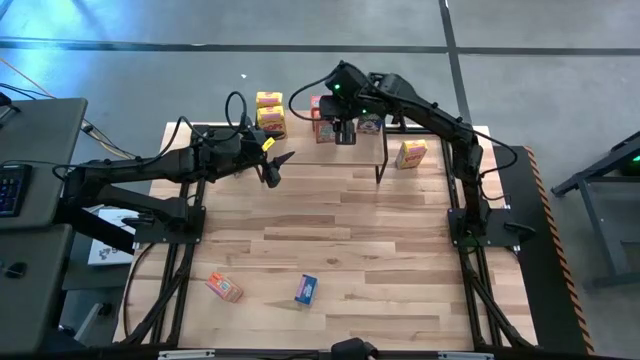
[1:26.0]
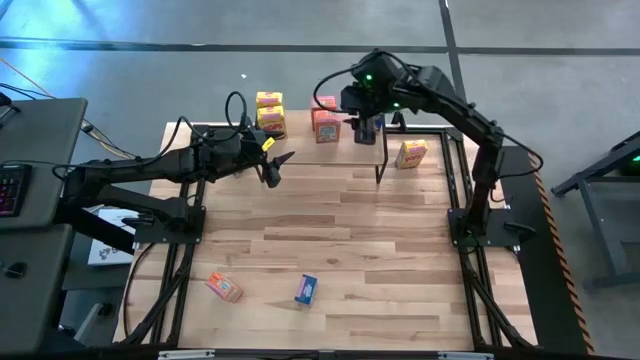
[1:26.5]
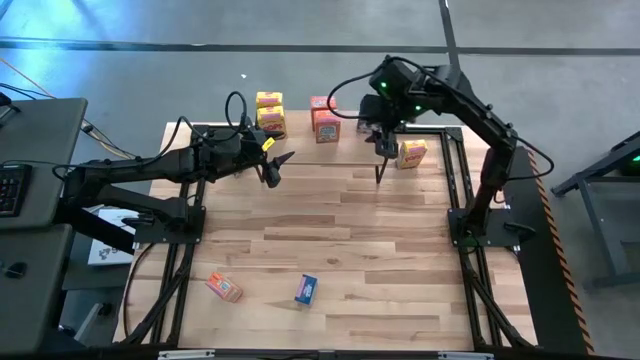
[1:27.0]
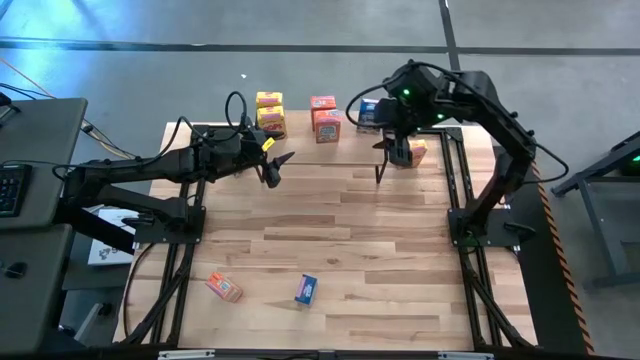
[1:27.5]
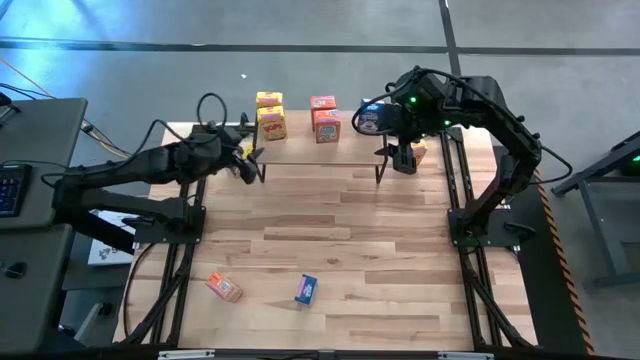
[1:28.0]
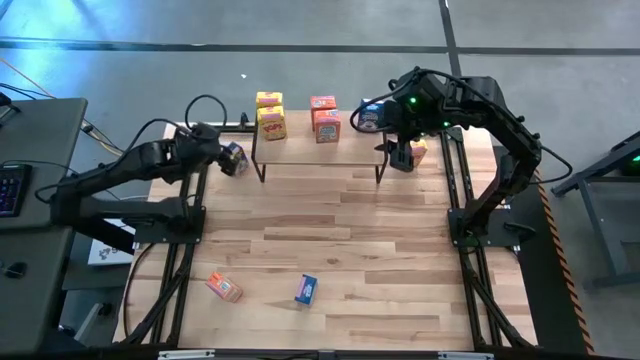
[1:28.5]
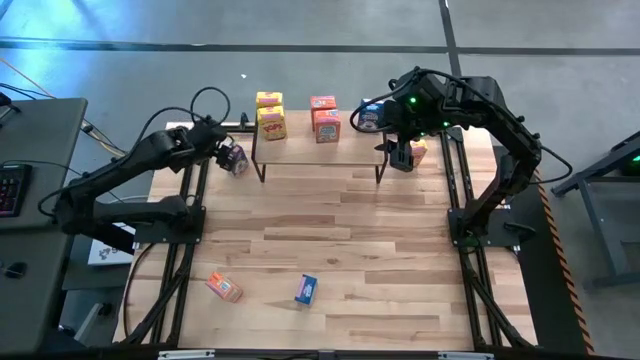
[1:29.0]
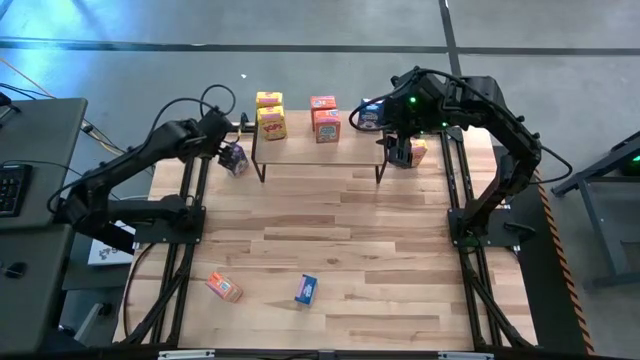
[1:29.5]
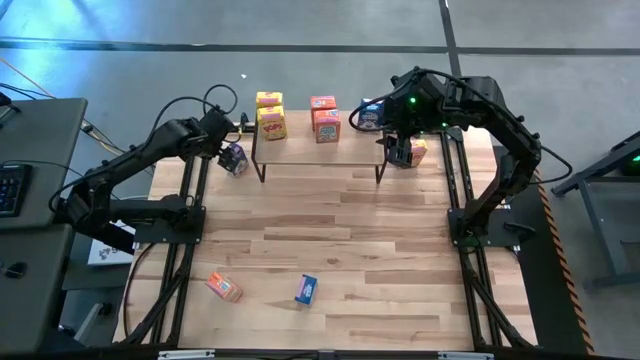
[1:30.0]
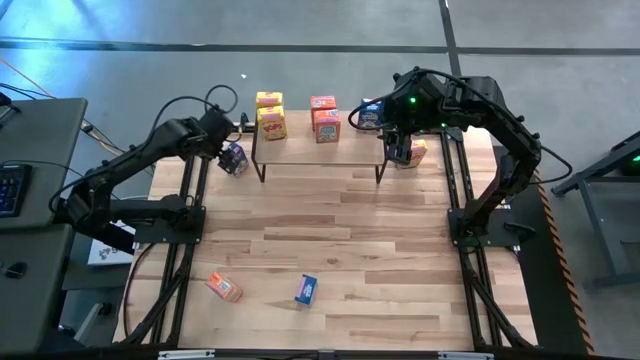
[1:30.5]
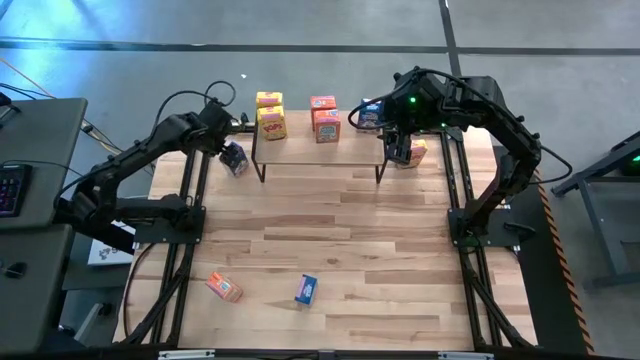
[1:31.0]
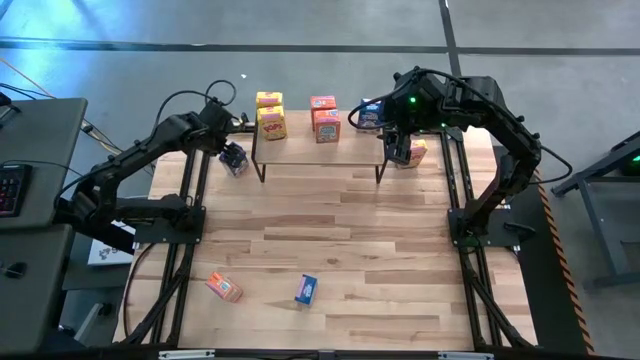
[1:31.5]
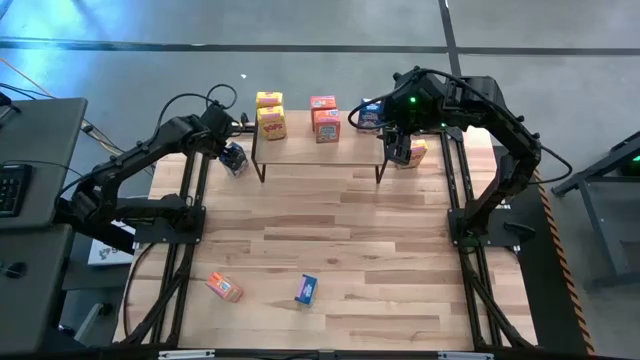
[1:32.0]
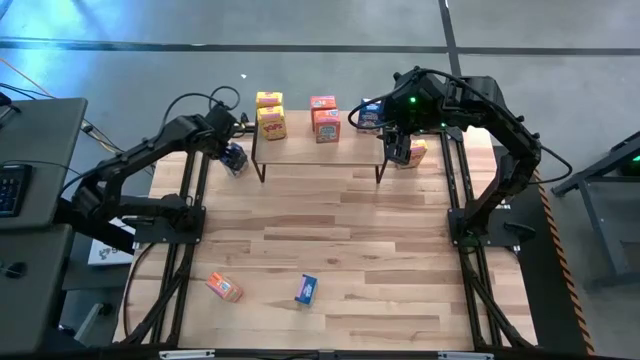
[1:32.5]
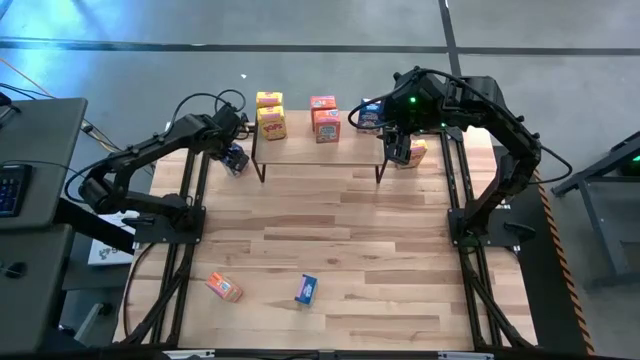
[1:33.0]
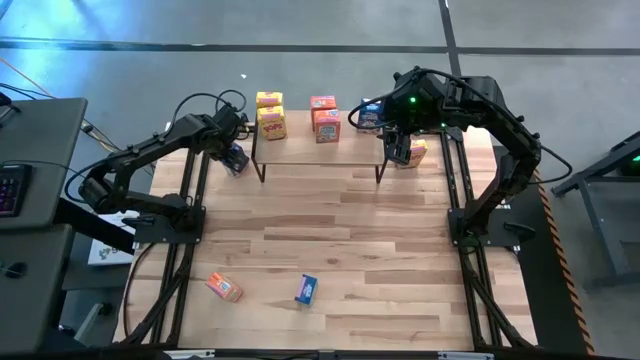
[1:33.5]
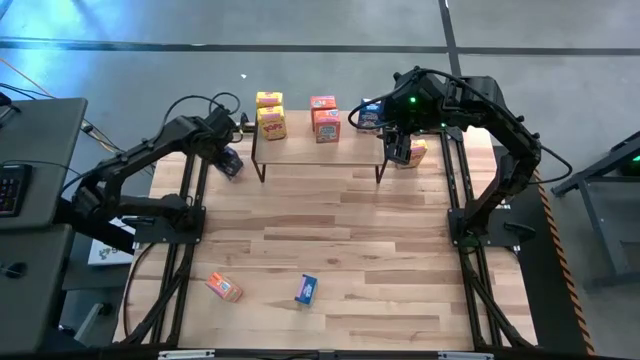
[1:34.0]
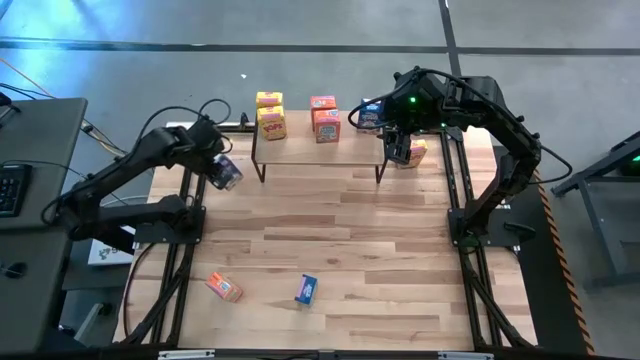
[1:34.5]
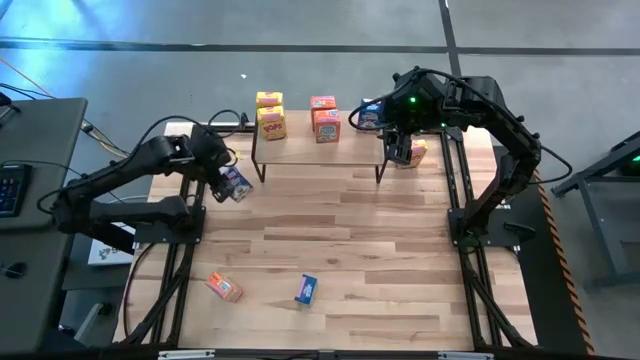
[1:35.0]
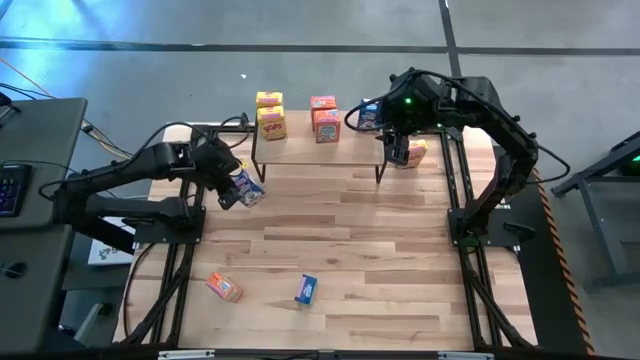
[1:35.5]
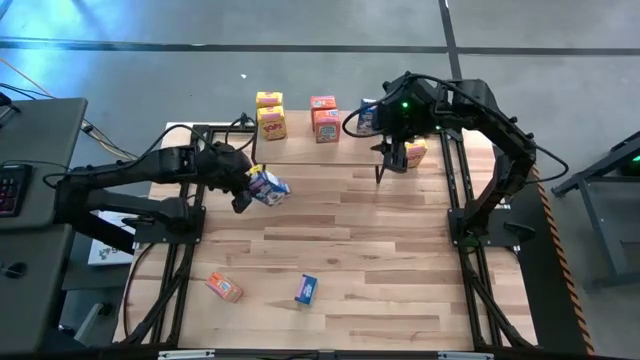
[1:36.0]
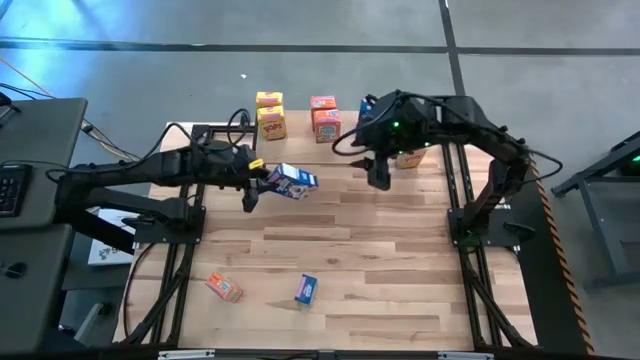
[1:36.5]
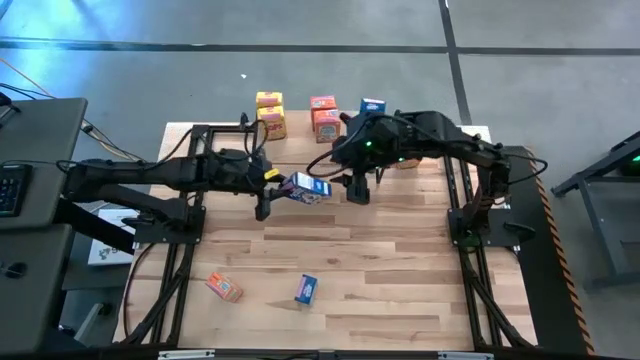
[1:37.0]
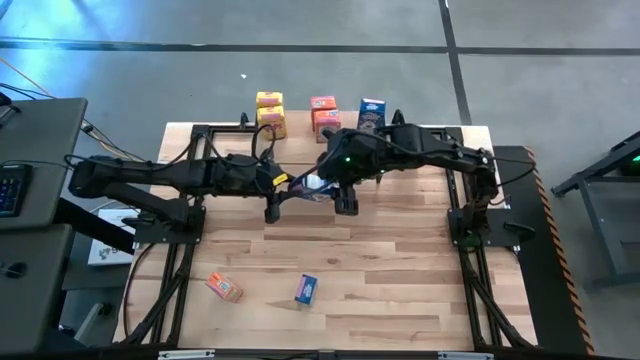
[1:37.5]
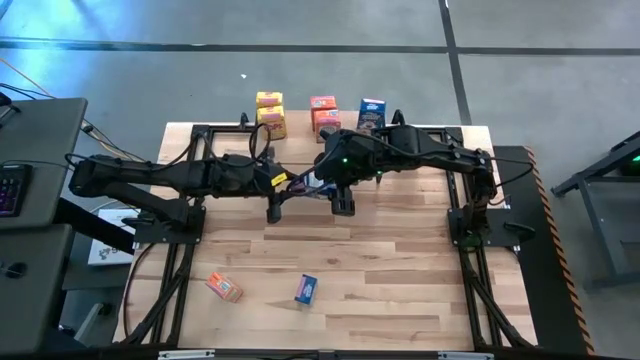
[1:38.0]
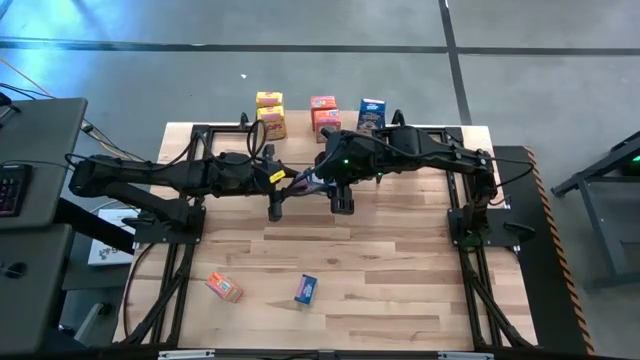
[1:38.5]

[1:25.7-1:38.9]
Task: Stack cereal on shelf
Put the top blue cereal box aligned with the other blue cereal box on the shelf
